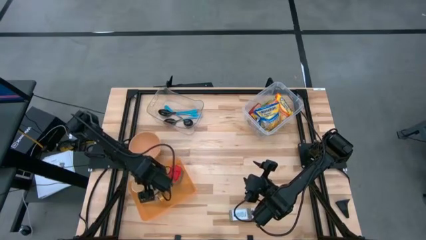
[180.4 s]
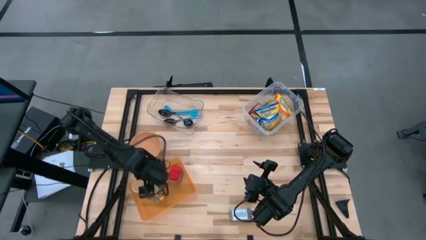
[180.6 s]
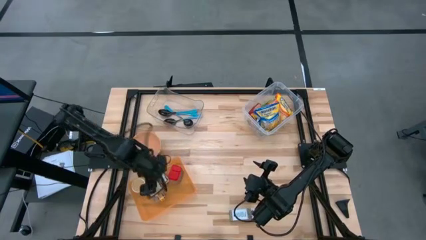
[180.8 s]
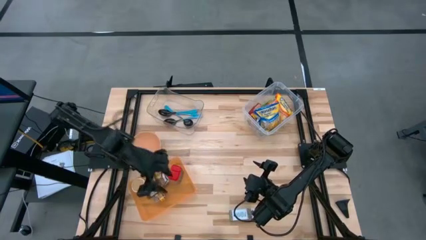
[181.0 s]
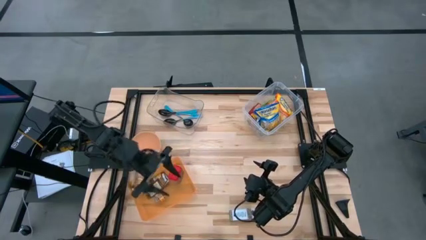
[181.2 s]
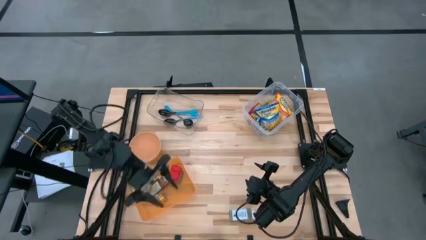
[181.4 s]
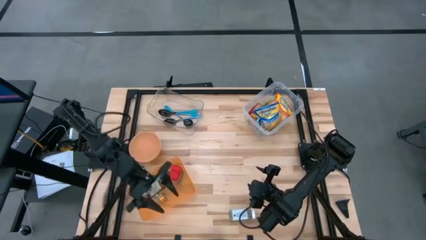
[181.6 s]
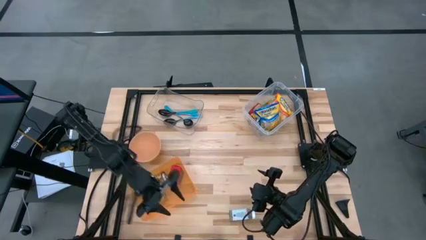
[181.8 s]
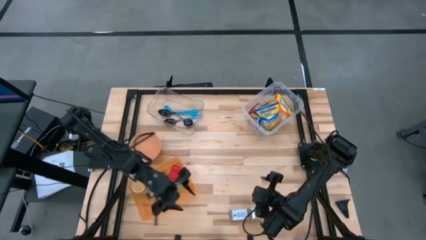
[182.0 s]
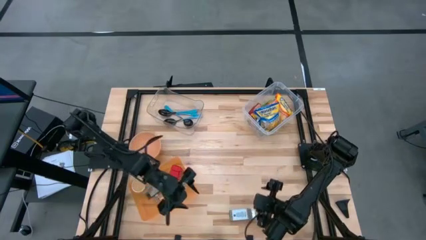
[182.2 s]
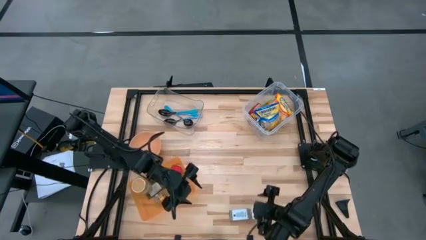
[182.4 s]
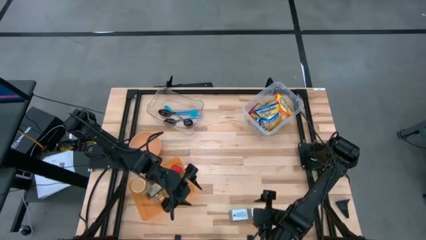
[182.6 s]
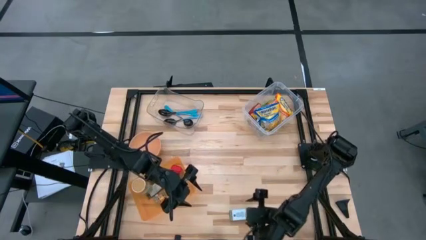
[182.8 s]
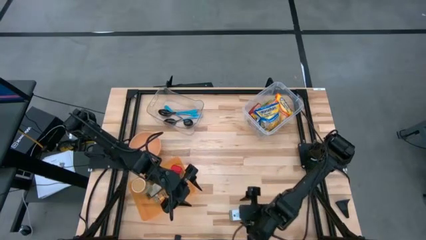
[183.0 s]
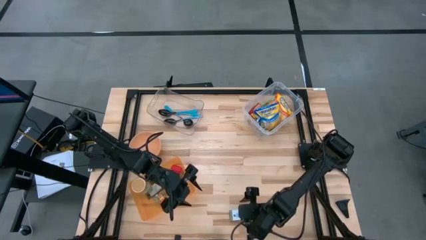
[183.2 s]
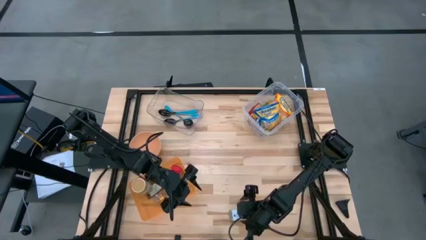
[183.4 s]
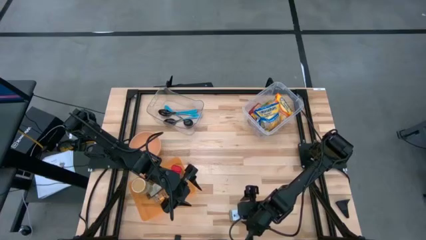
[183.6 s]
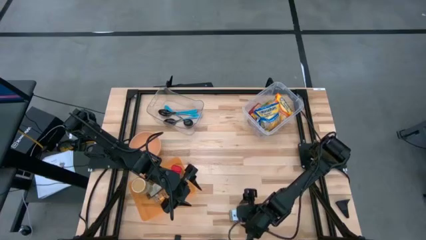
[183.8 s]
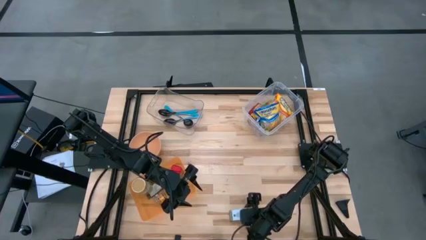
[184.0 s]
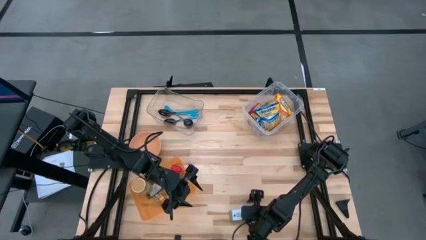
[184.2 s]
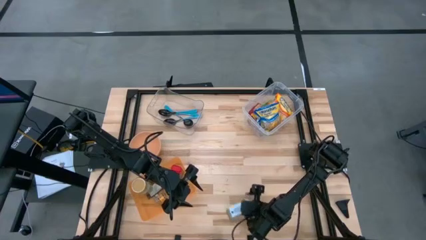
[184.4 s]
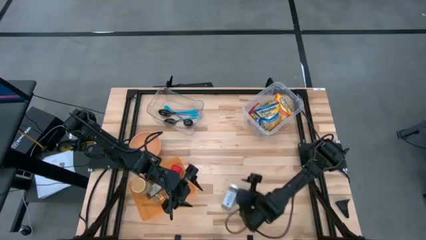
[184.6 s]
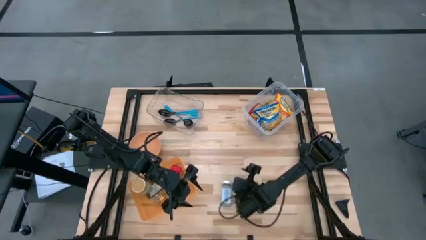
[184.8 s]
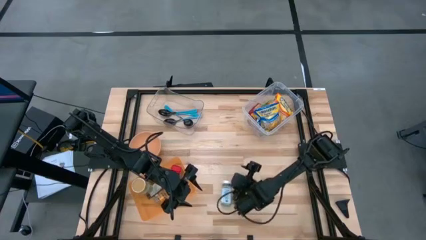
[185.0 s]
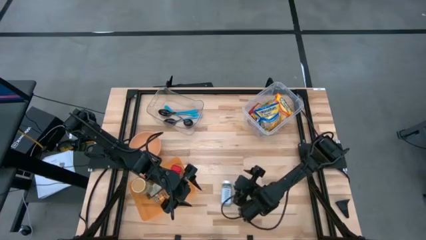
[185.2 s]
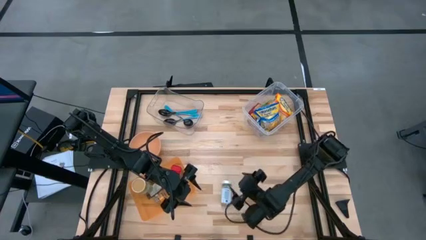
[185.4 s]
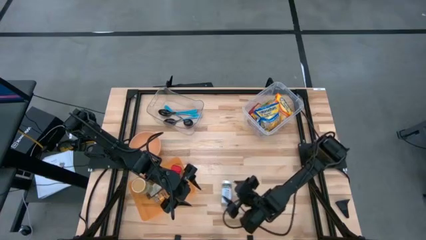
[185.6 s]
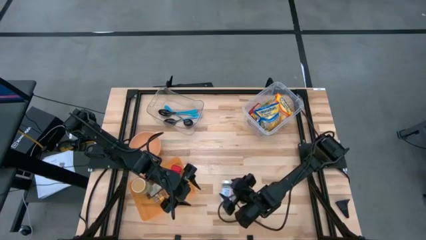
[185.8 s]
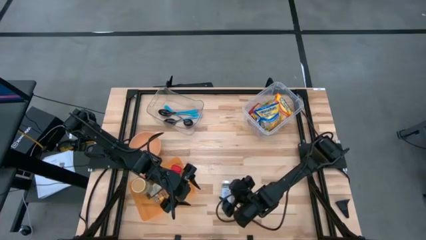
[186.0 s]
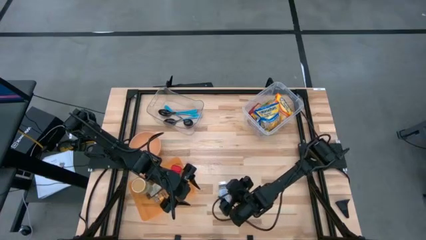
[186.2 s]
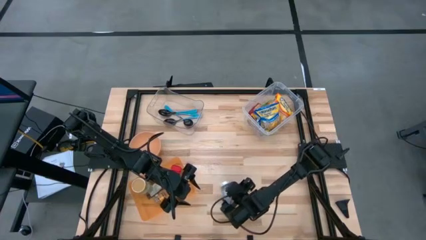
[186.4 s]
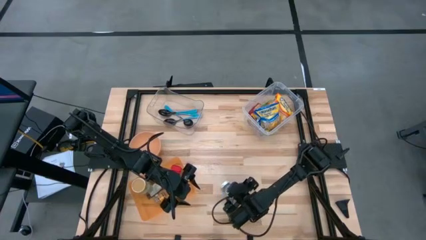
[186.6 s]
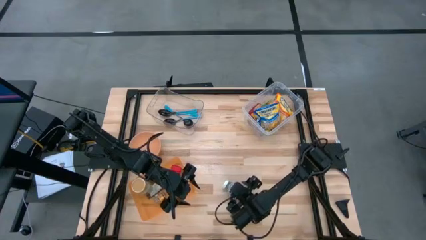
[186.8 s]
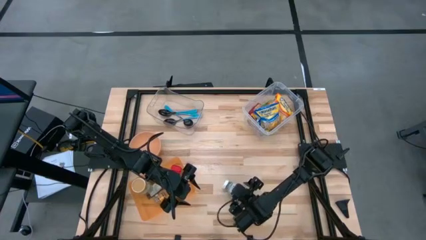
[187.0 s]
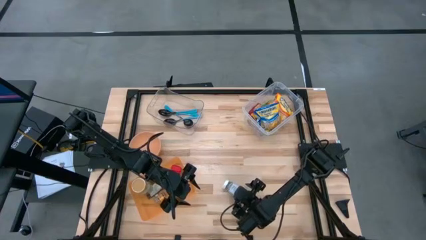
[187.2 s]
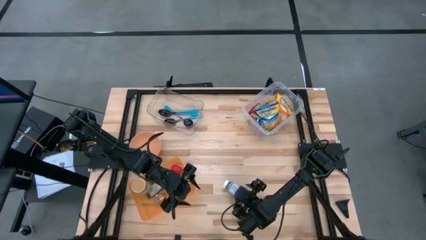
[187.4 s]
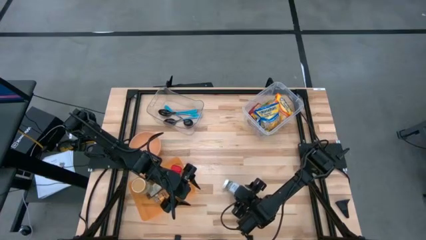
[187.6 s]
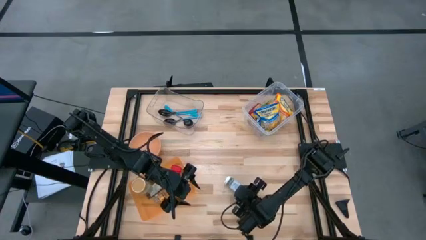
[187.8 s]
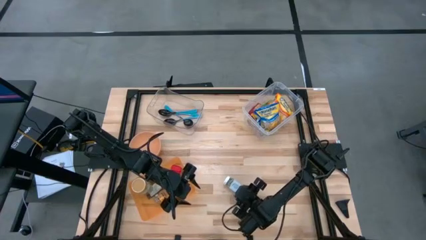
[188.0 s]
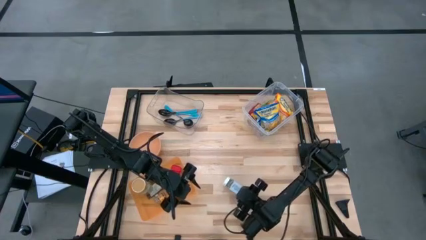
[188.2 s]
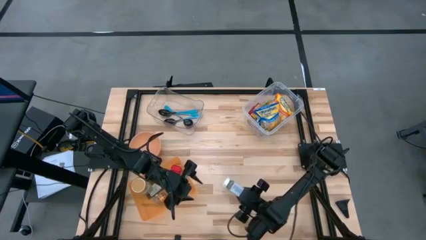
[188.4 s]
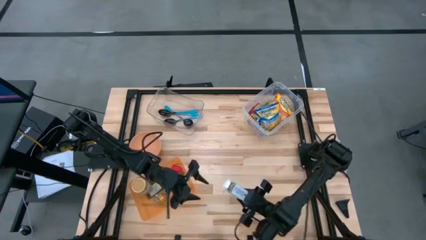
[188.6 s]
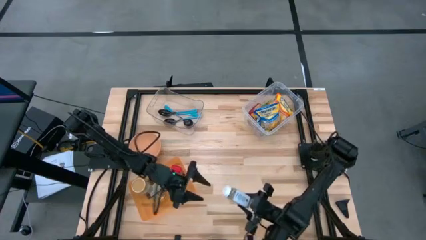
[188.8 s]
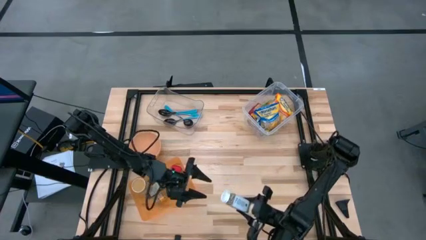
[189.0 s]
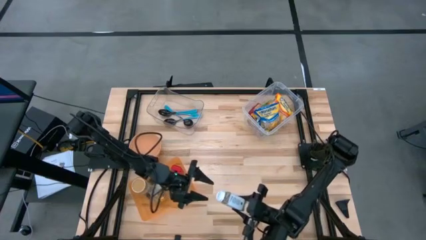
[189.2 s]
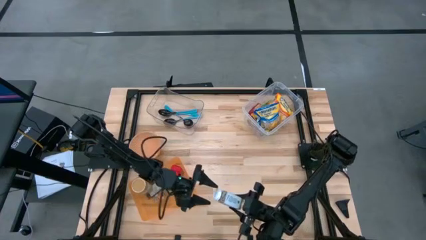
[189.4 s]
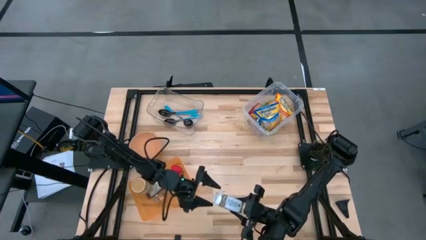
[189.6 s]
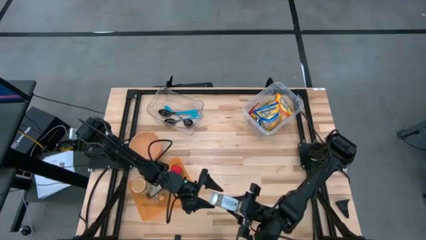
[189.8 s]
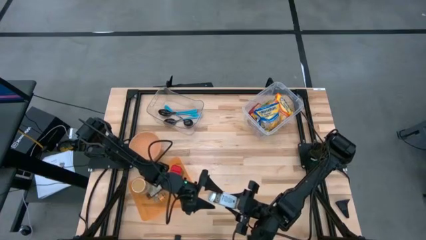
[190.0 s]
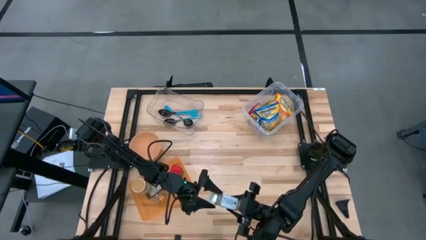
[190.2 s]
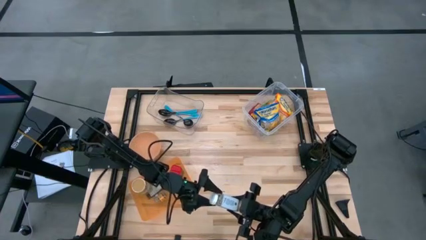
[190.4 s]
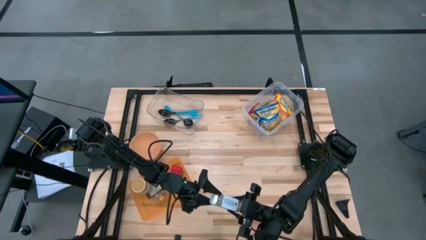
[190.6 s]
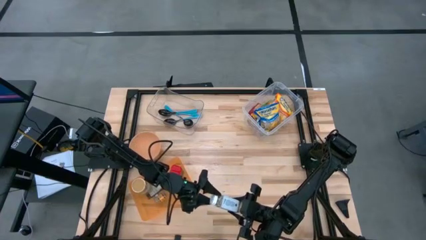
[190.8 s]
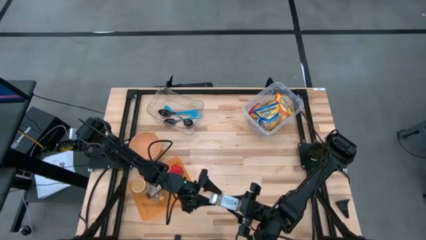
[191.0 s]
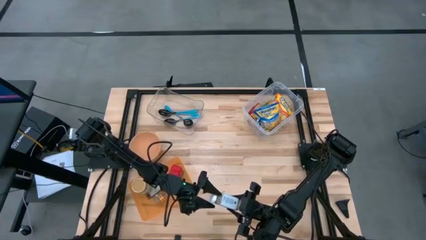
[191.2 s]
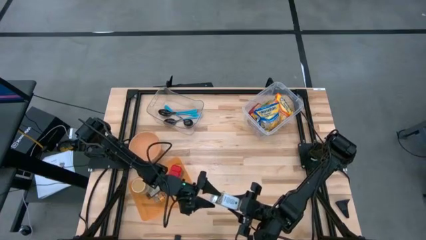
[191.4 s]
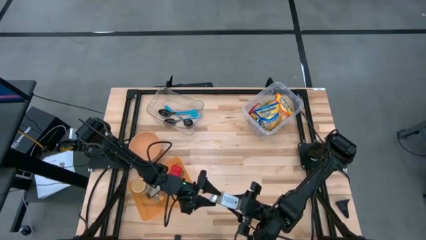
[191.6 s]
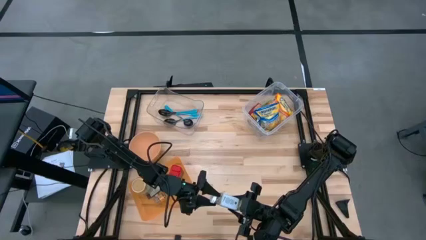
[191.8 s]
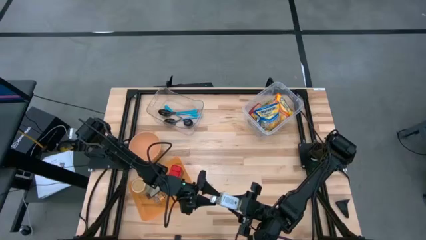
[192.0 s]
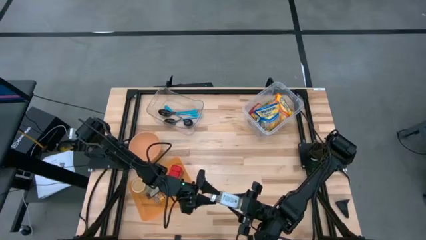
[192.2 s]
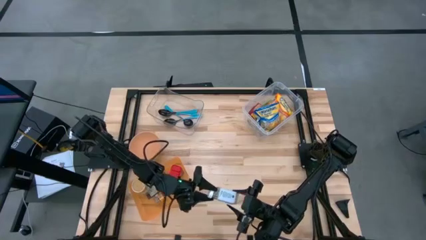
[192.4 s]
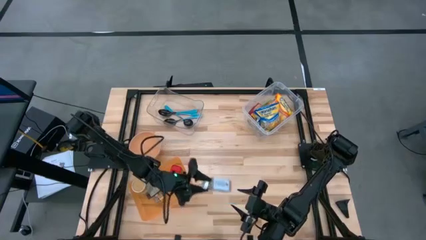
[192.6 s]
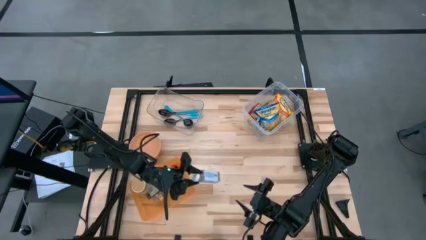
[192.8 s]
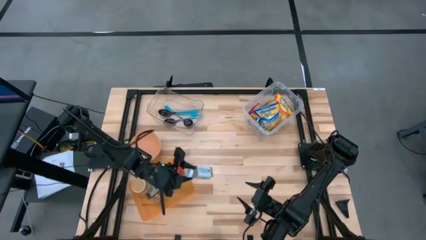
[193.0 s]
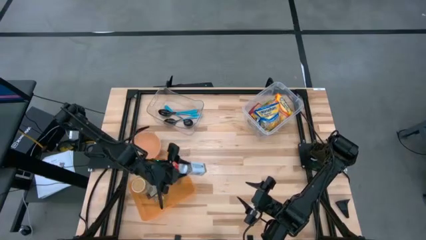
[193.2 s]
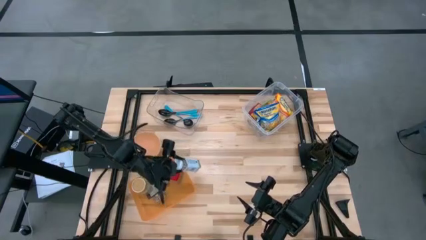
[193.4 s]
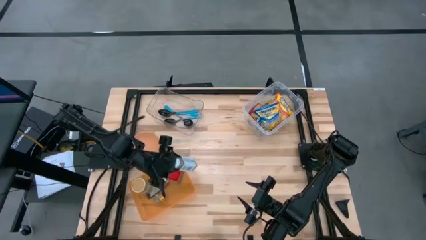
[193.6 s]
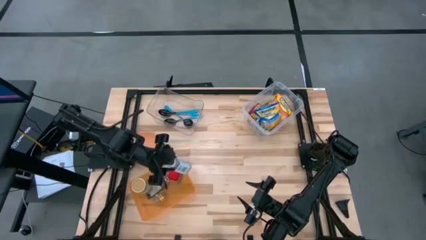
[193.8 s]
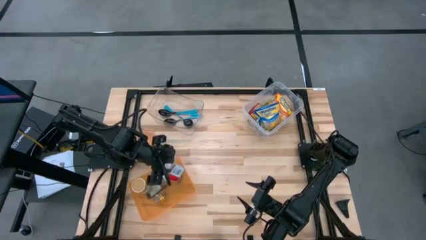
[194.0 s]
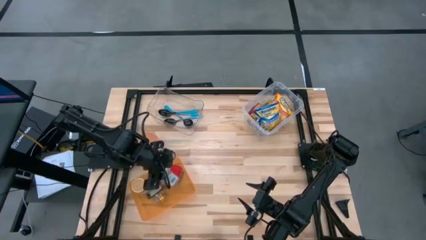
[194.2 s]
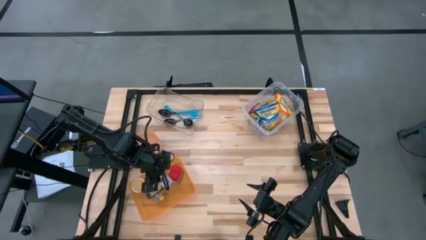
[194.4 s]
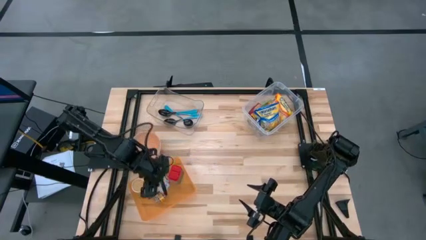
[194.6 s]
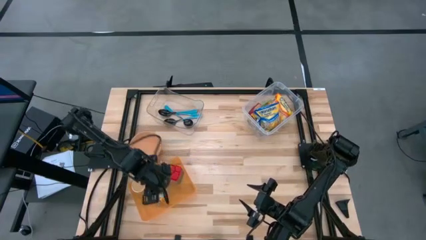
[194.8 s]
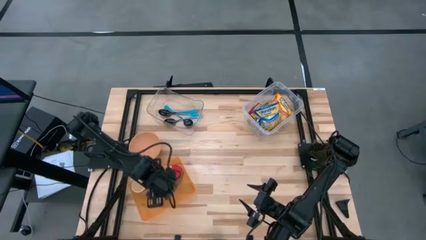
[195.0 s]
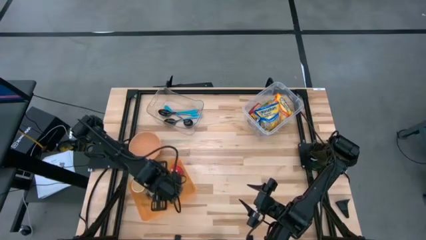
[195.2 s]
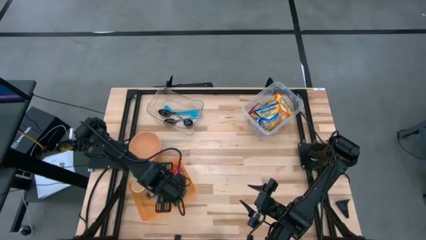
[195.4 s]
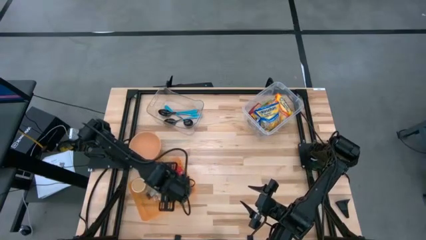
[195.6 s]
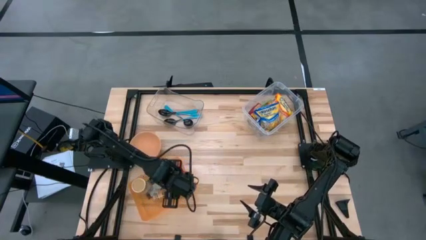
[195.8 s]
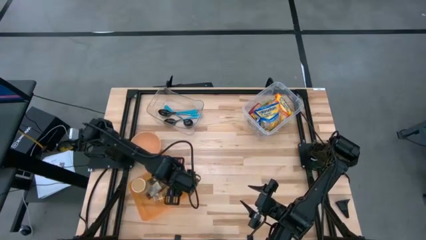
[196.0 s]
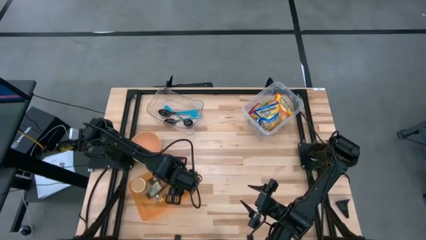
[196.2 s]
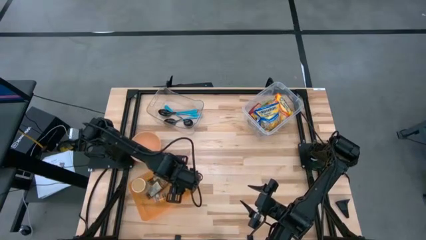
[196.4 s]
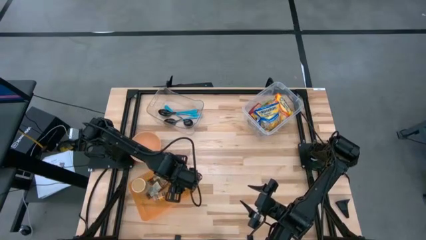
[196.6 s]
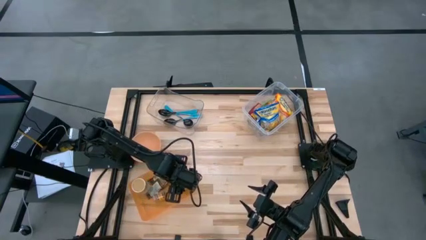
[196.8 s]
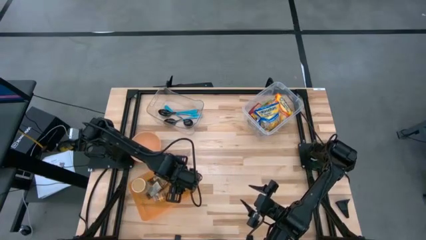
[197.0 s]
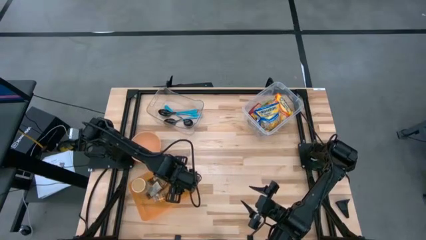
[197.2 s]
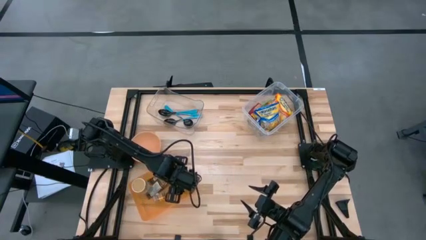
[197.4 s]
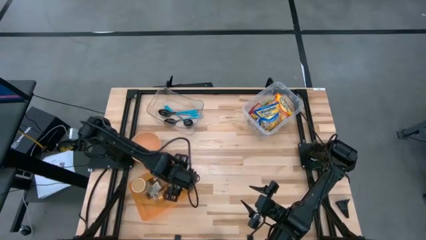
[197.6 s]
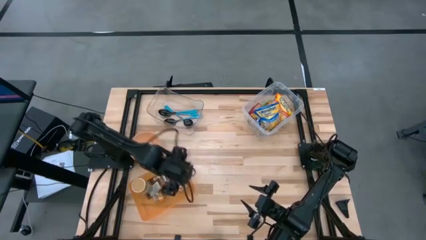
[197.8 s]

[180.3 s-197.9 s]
Task: Pick & Place Food Item
Put the white seasoning bottle into the orange bin
